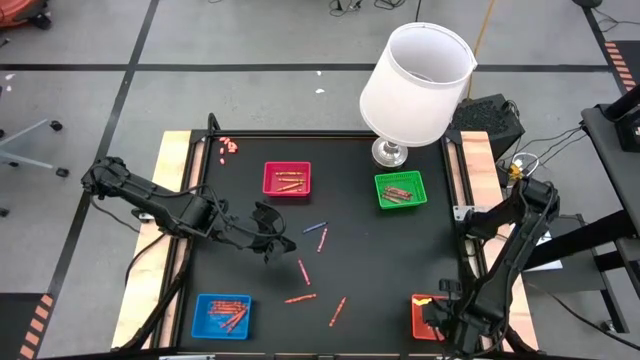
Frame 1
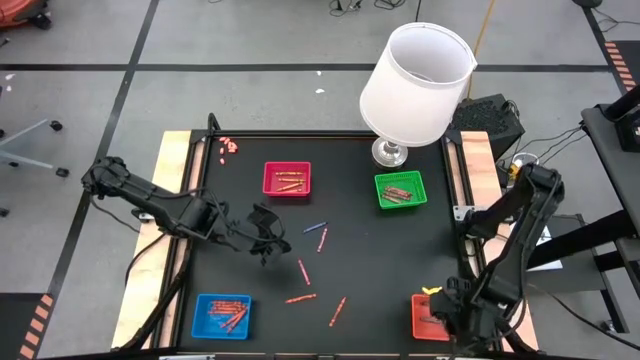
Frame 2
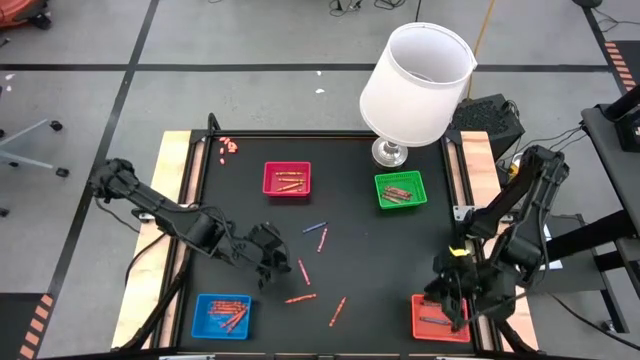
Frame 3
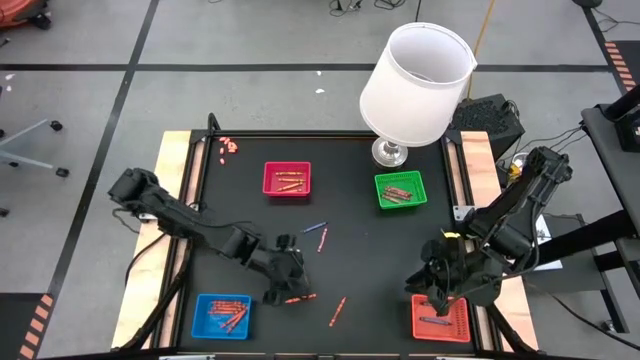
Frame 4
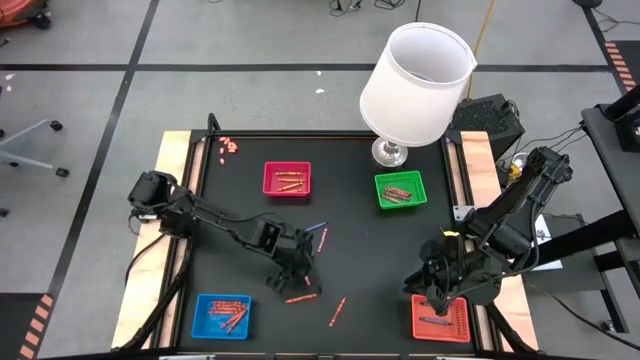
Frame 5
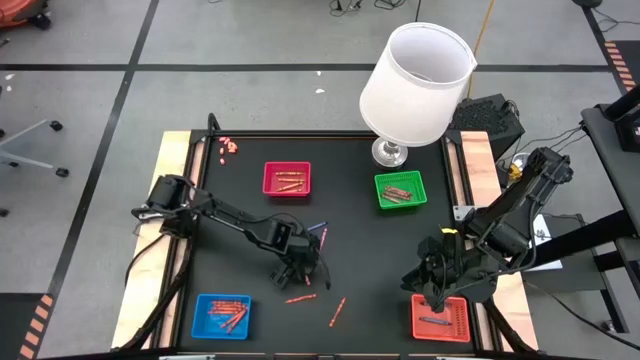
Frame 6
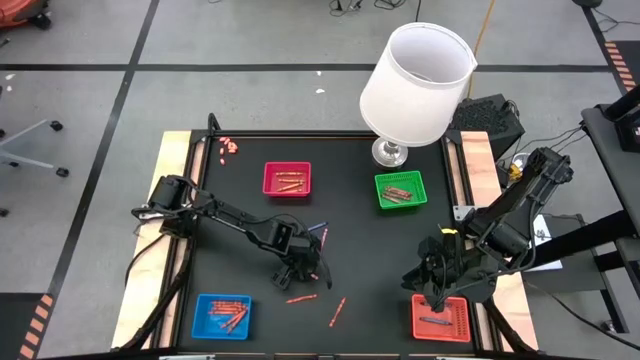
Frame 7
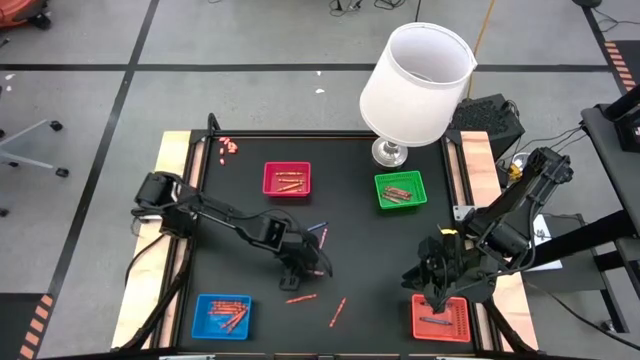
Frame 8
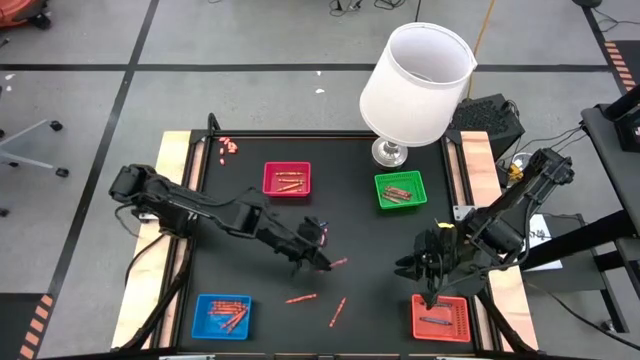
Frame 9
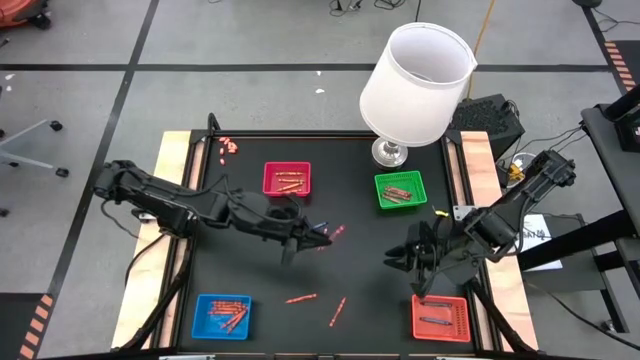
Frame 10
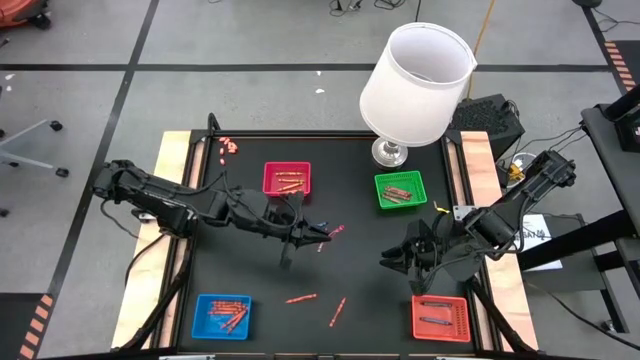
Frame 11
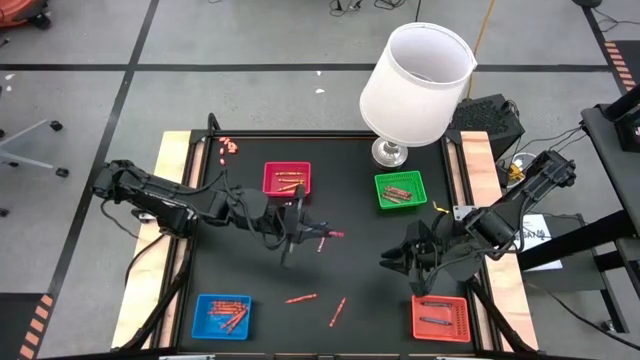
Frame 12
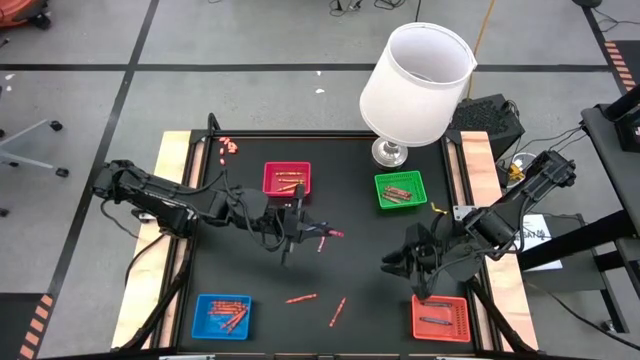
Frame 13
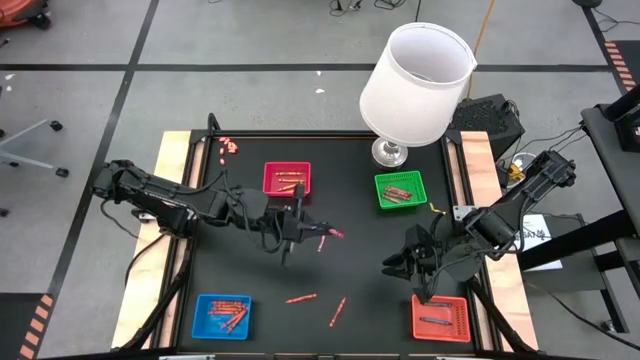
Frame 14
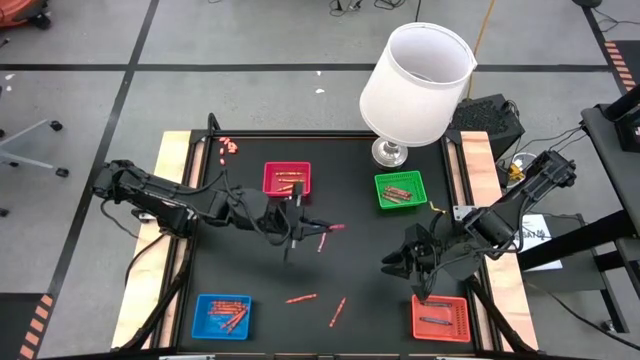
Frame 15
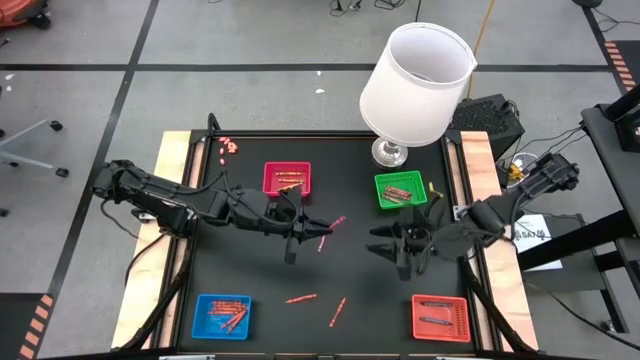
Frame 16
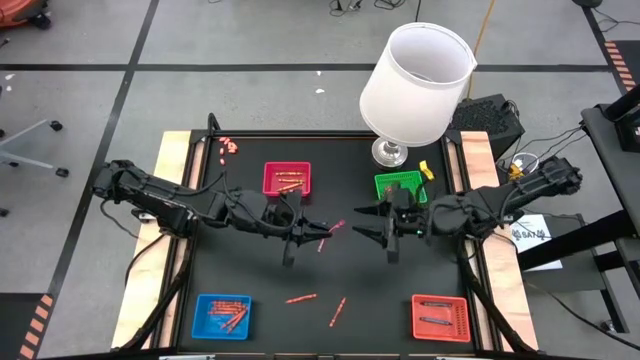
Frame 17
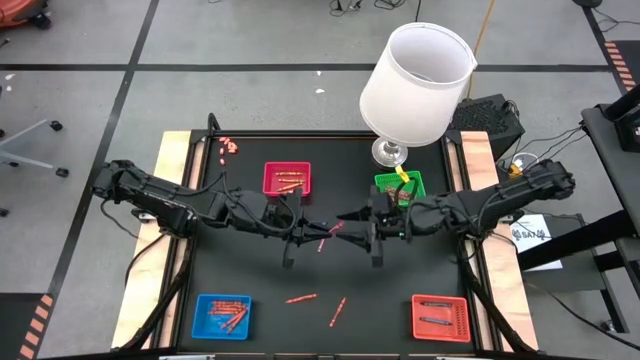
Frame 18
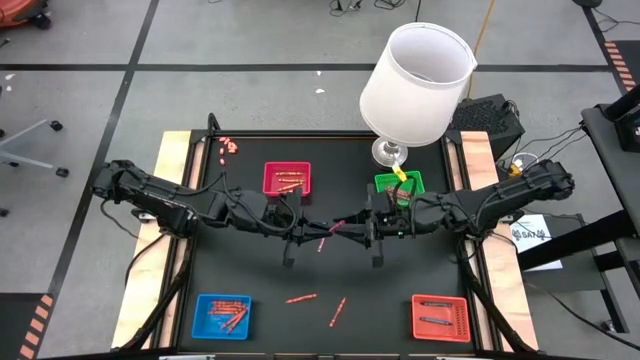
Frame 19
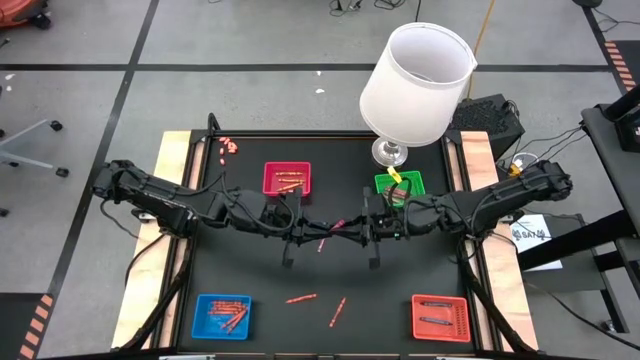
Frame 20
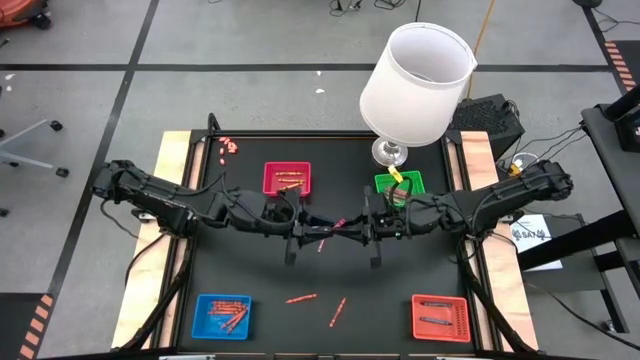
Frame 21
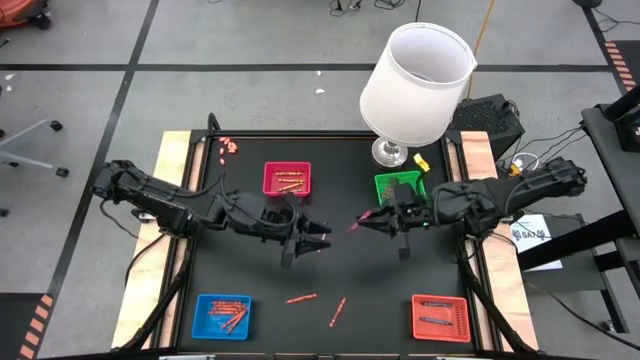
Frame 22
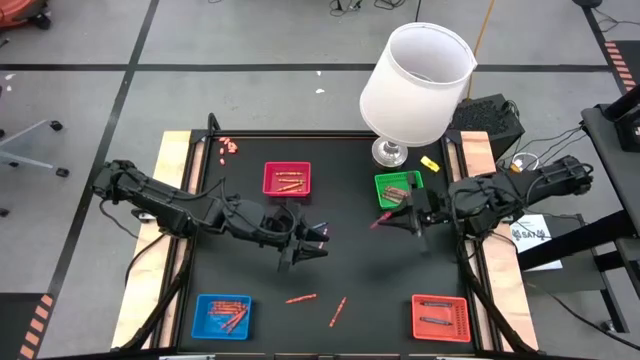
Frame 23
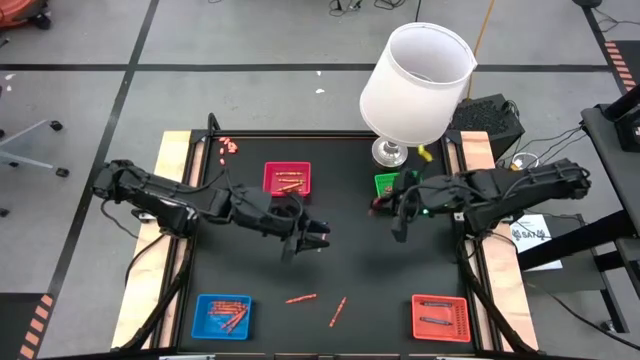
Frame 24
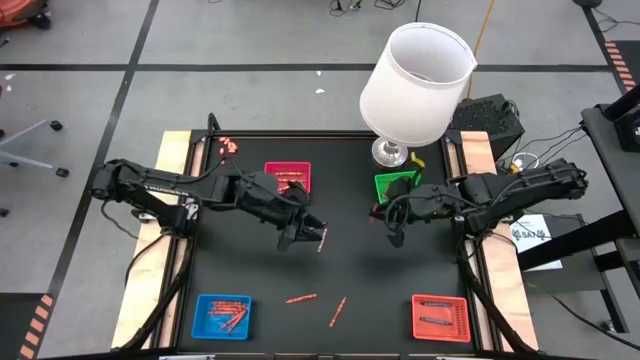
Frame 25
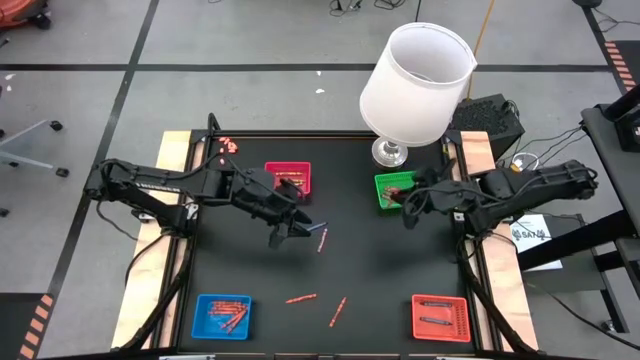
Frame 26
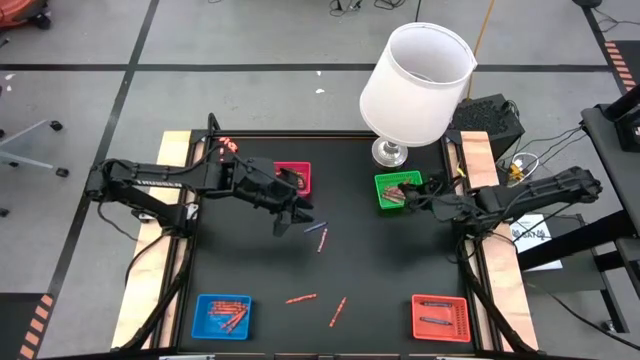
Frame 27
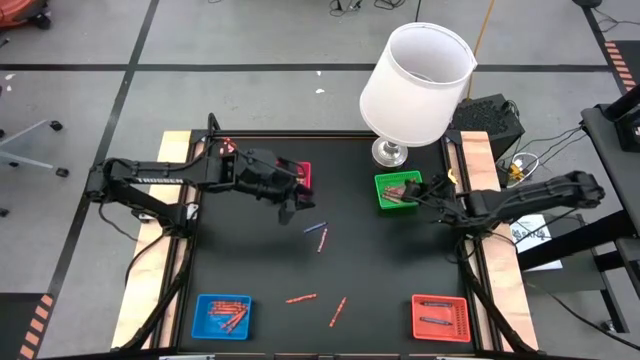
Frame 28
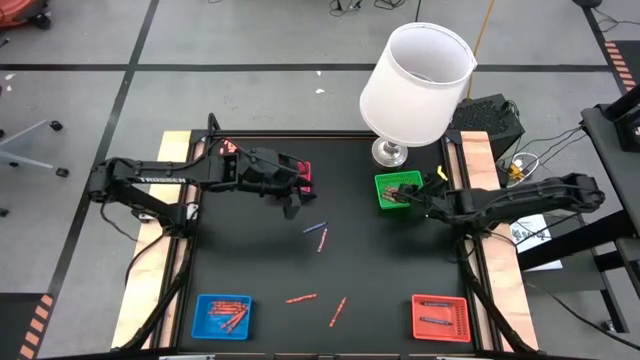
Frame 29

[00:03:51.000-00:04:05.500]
Task: Sort crayons
Put the red crayon into the green basket

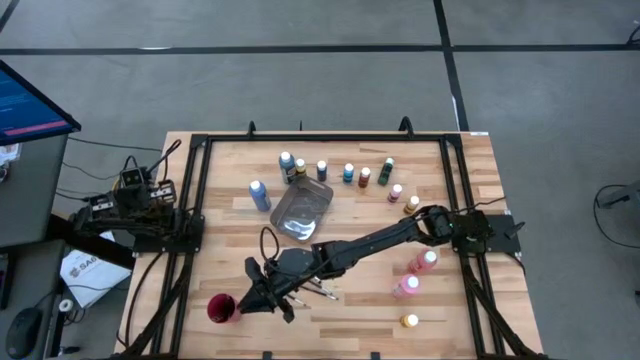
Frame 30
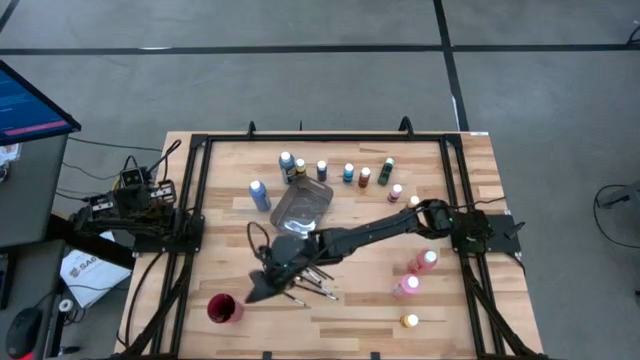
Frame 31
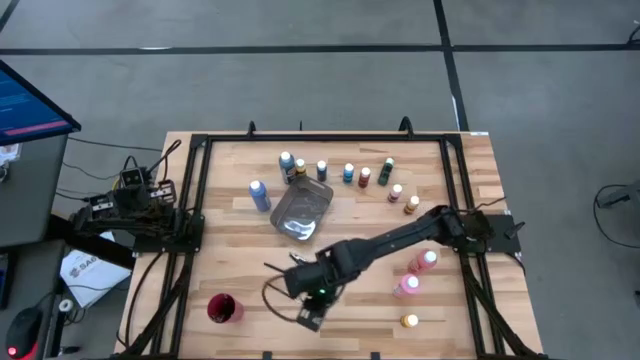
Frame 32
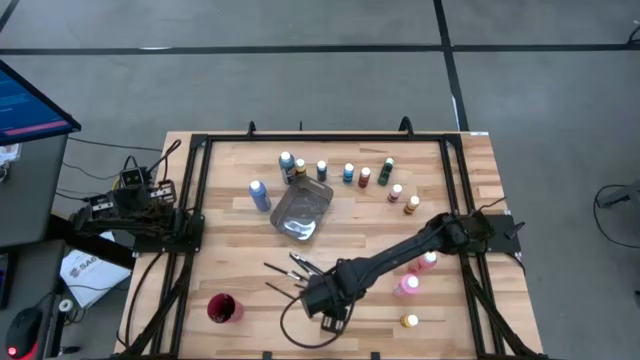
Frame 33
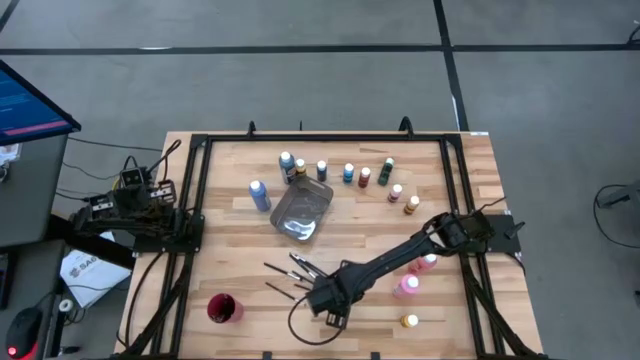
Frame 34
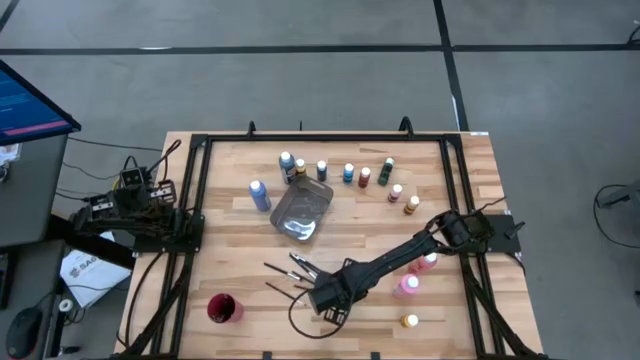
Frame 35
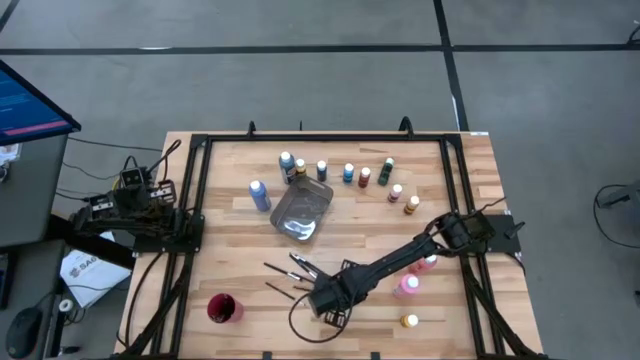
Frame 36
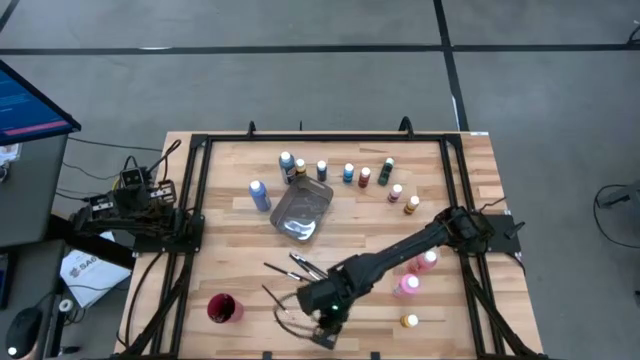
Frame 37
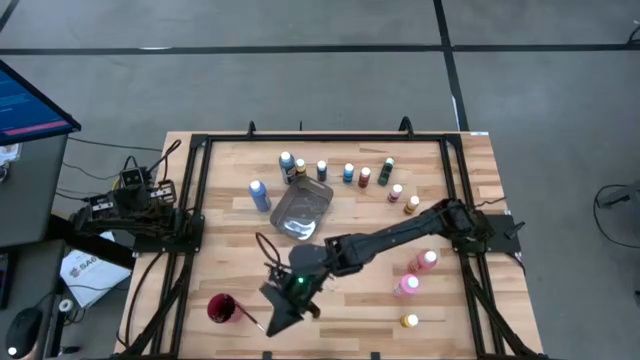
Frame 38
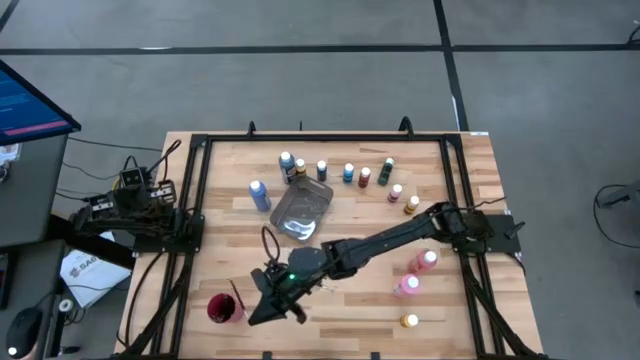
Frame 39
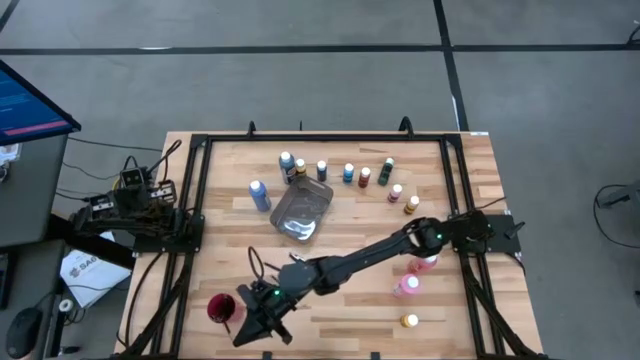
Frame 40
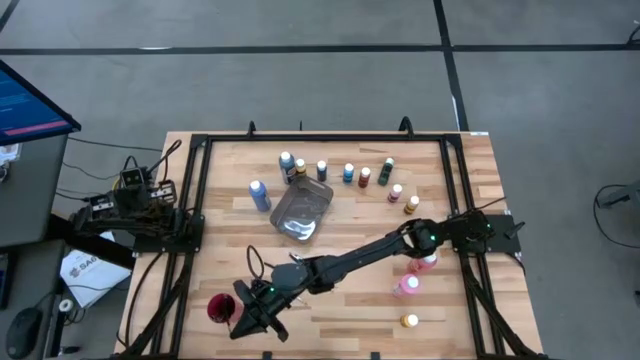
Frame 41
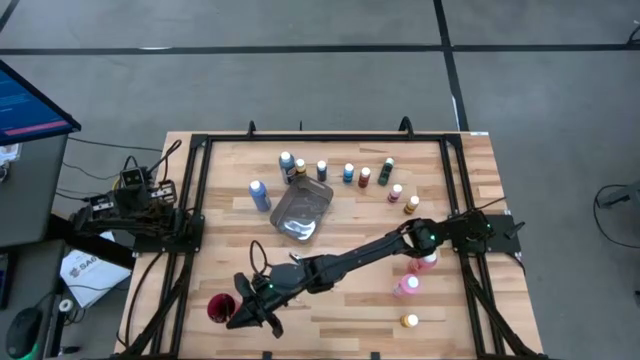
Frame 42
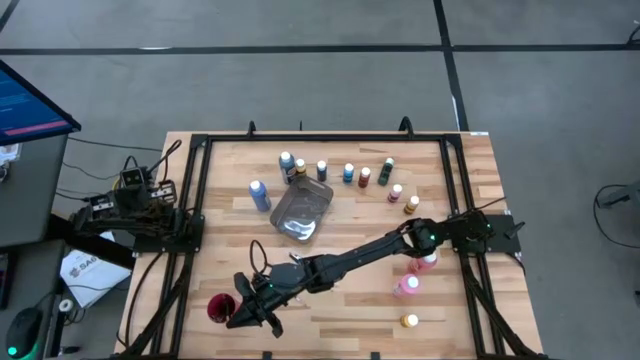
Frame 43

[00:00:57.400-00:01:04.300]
Task: Pick & Place Paint Supplies
Put the silver paintbrush into the red cup
